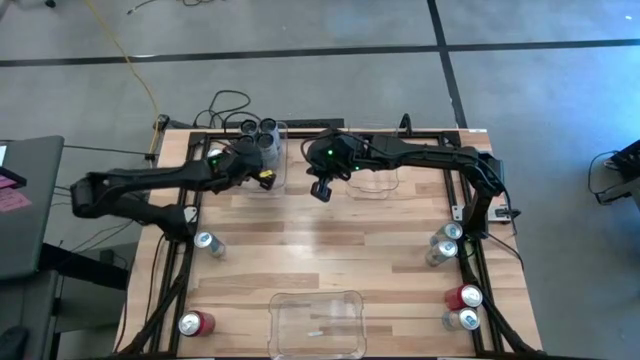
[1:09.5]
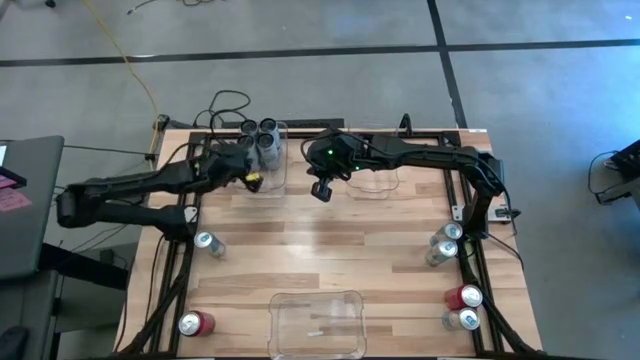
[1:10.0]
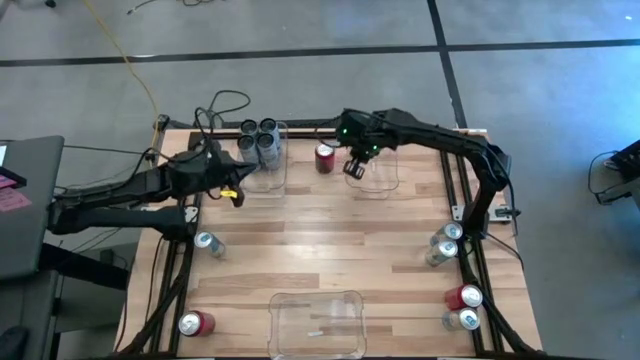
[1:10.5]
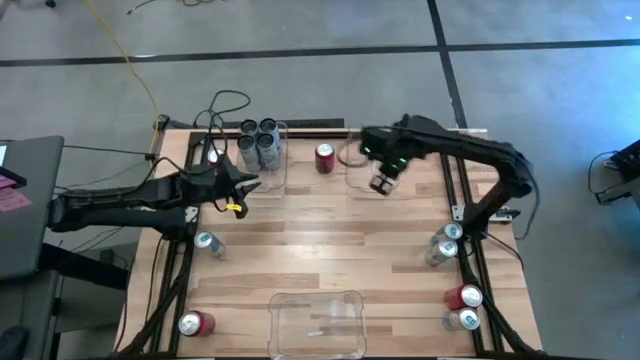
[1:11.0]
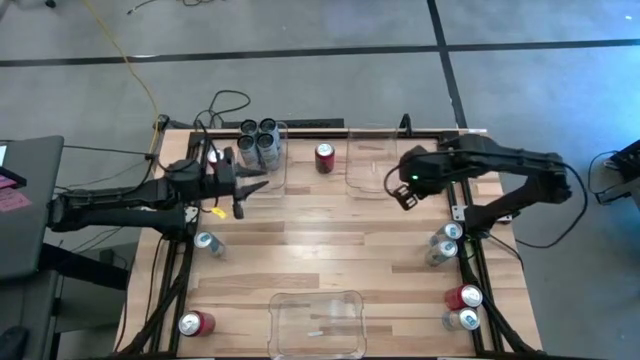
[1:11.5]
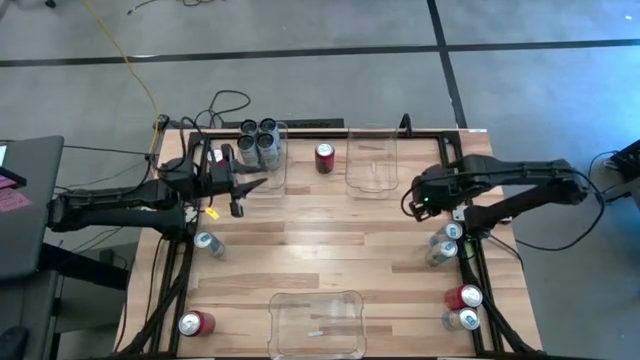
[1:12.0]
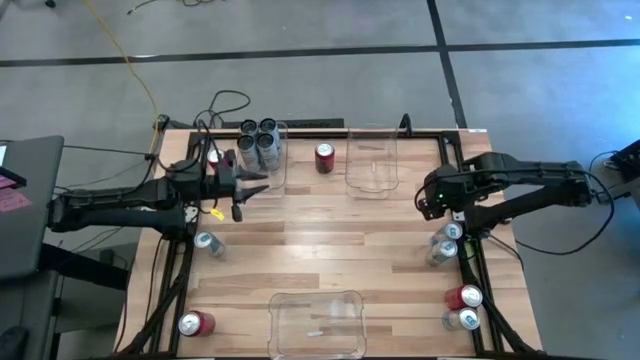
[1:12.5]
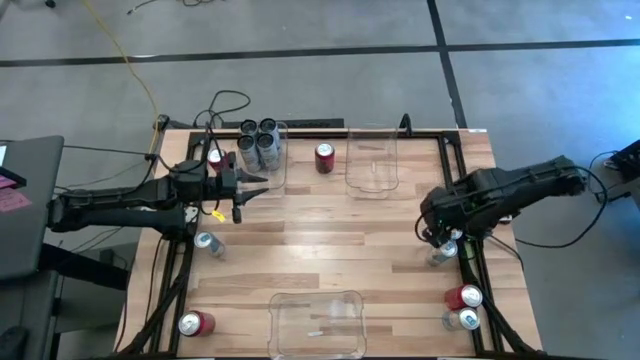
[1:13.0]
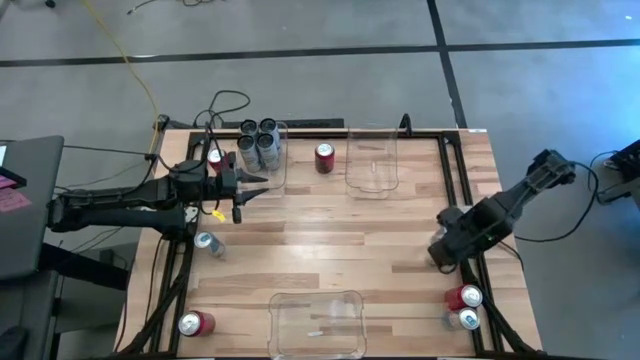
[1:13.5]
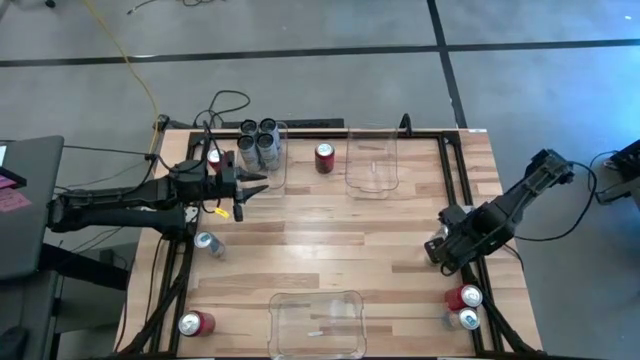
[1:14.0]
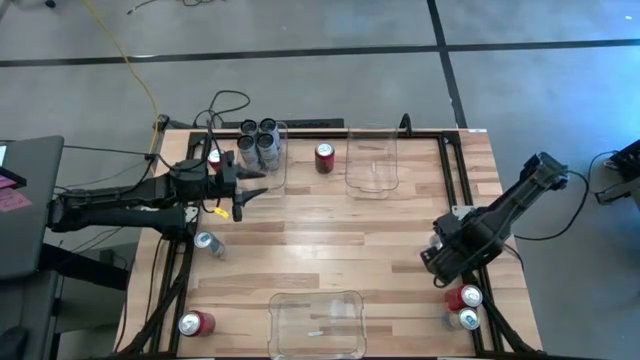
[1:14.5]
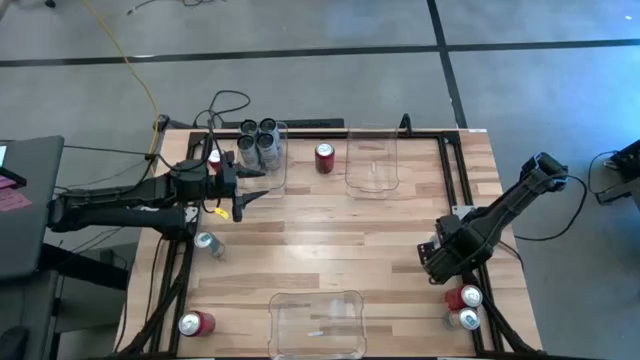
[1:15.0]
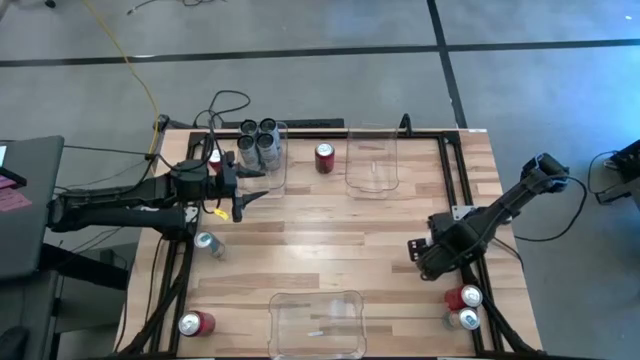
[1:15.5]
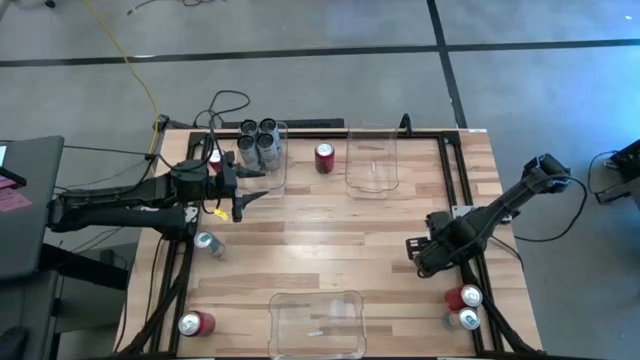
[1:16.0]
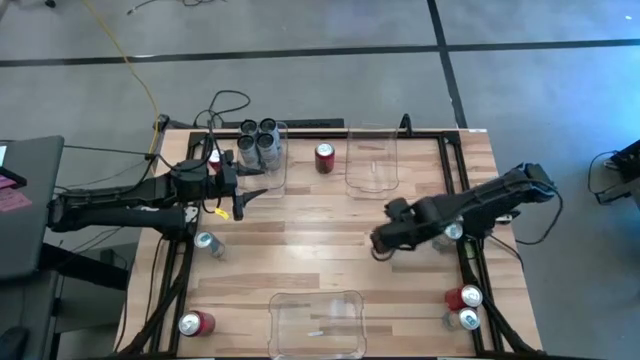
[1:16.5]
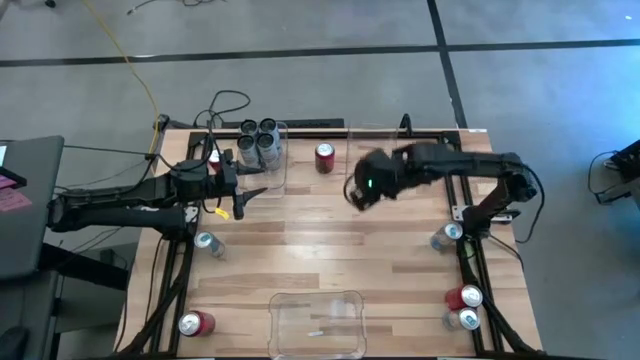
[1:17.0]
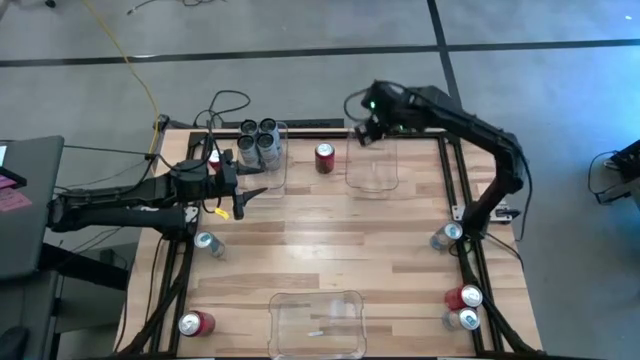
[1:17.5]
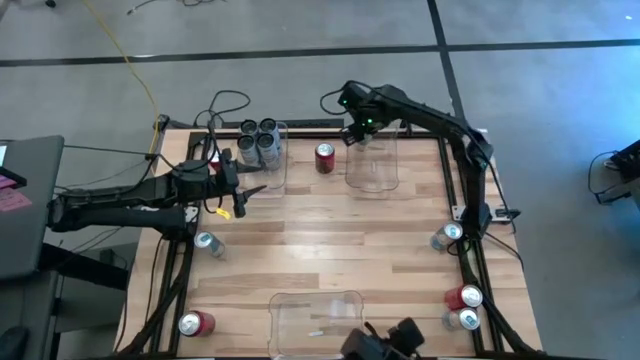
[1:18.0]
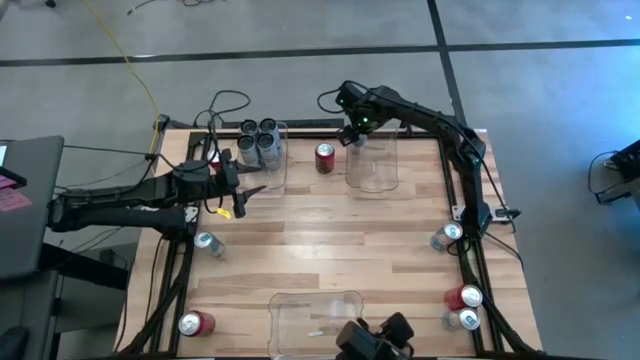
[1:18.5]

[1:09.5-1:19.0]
Task: Sort soda cans
Put the right center blue soda can into the top right transparent bin

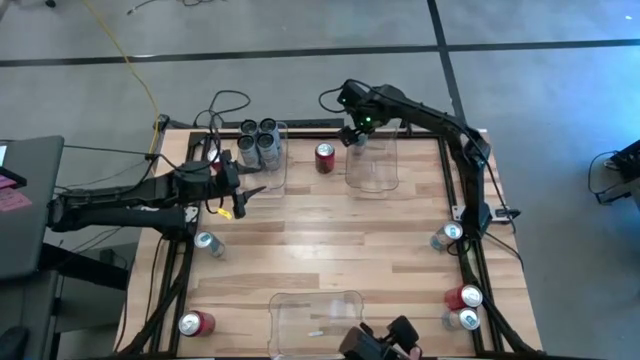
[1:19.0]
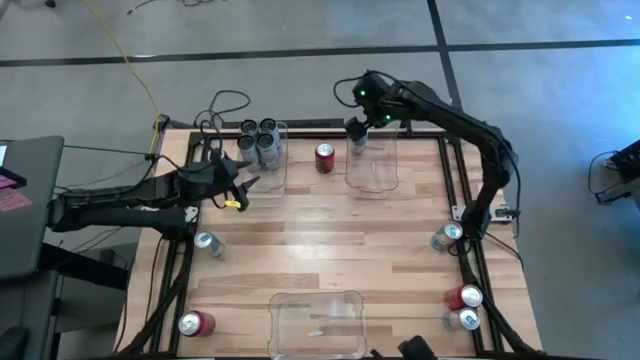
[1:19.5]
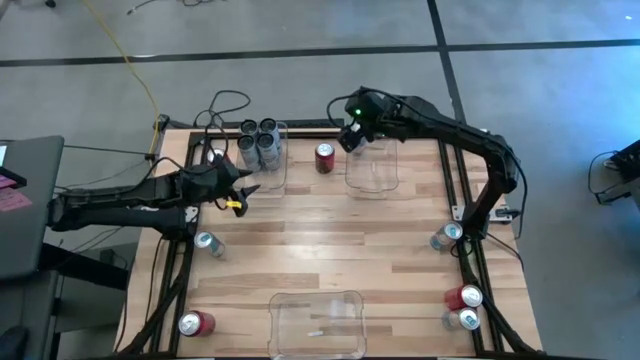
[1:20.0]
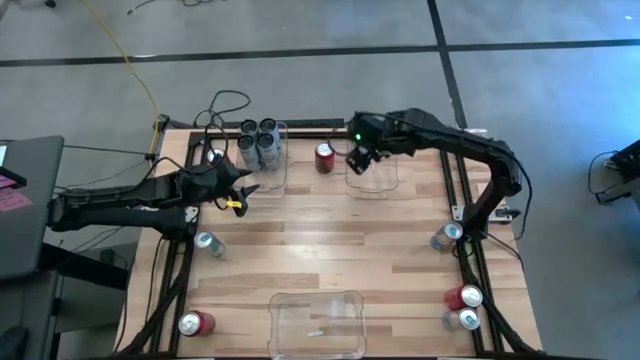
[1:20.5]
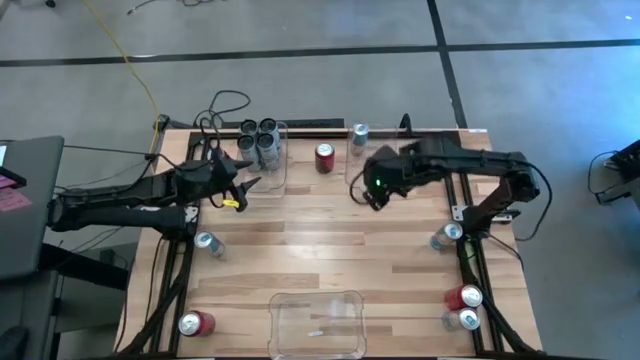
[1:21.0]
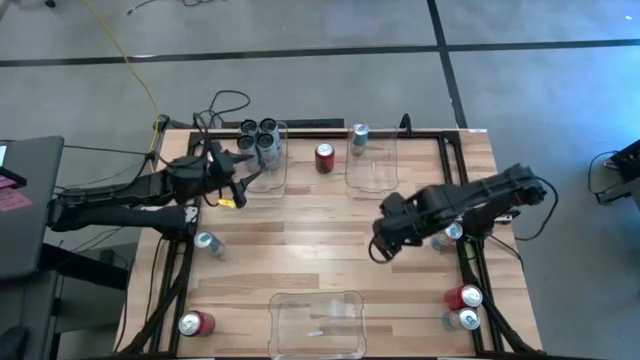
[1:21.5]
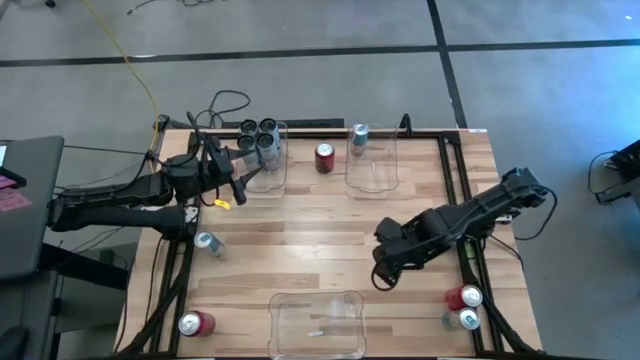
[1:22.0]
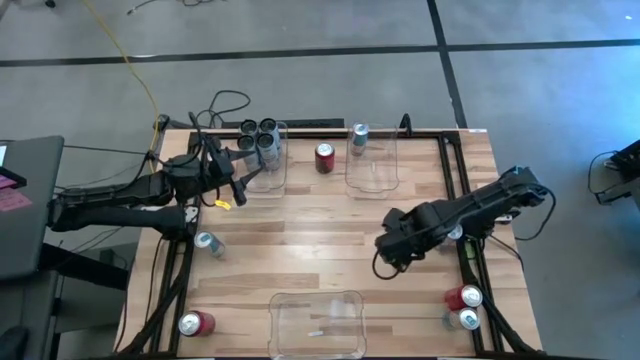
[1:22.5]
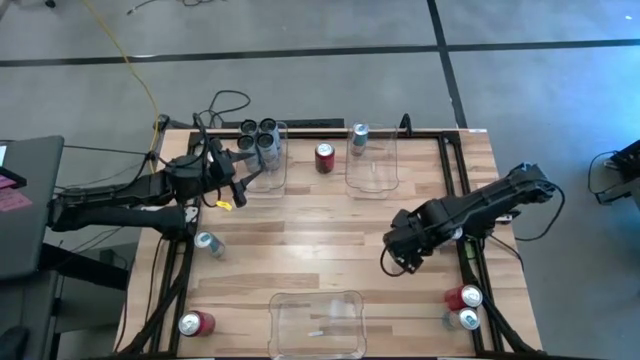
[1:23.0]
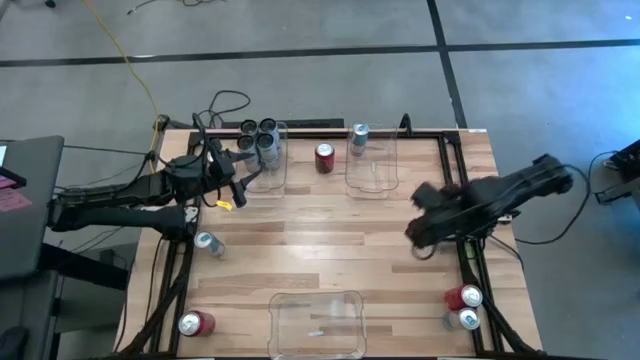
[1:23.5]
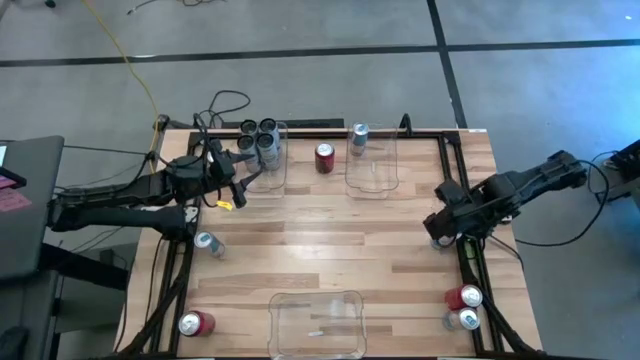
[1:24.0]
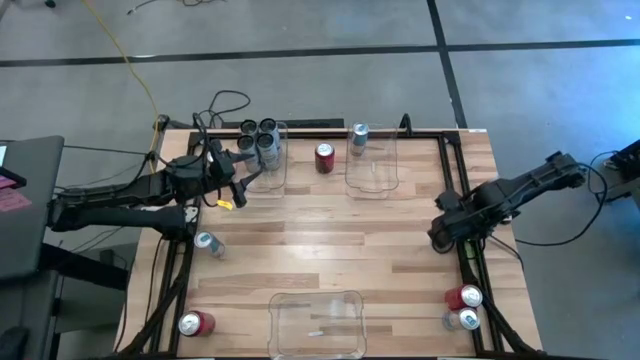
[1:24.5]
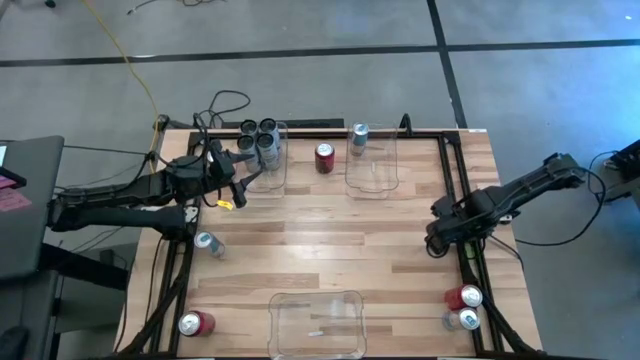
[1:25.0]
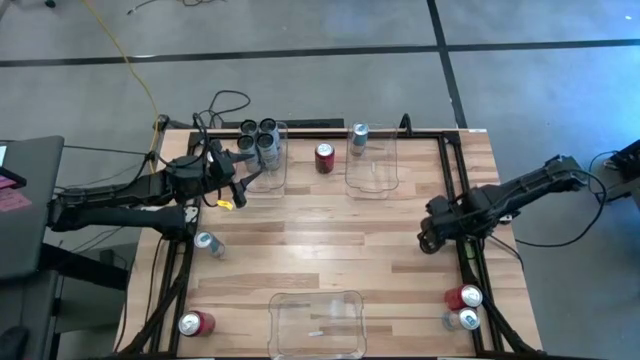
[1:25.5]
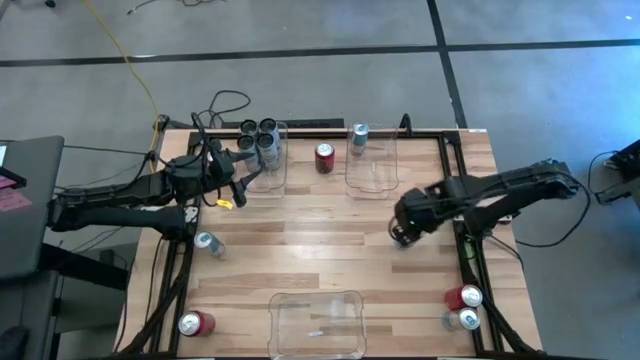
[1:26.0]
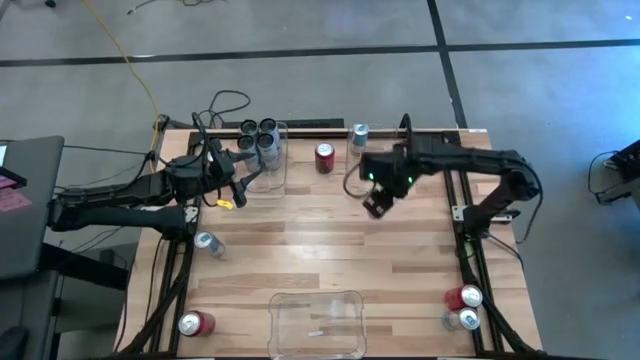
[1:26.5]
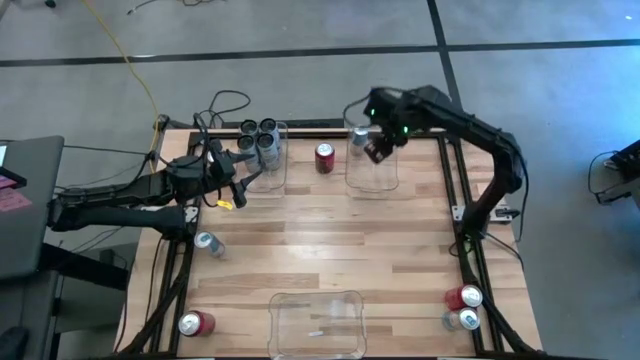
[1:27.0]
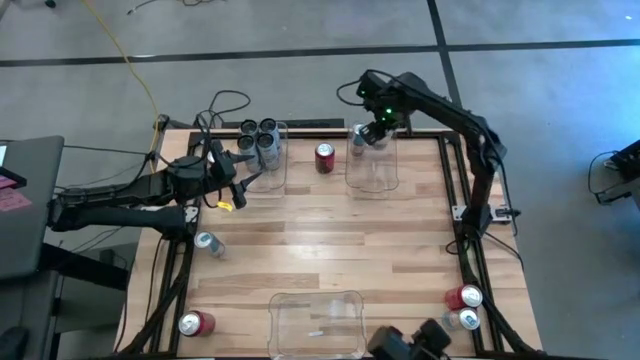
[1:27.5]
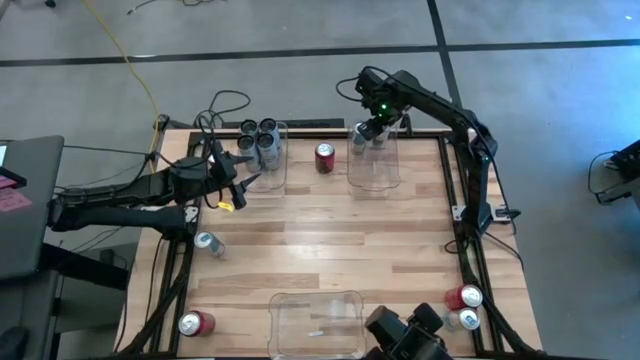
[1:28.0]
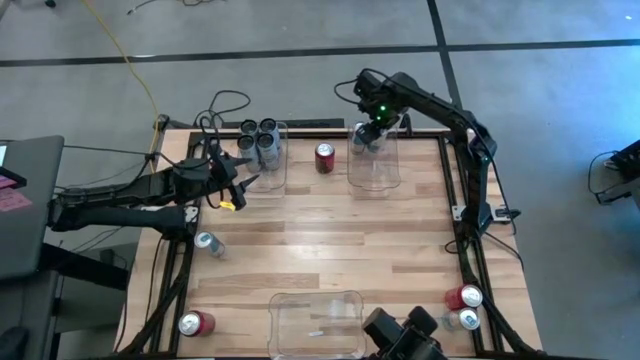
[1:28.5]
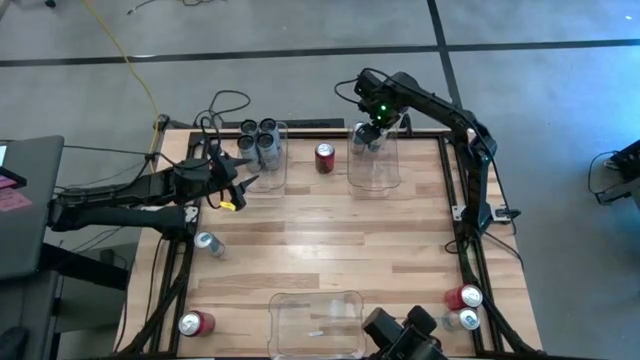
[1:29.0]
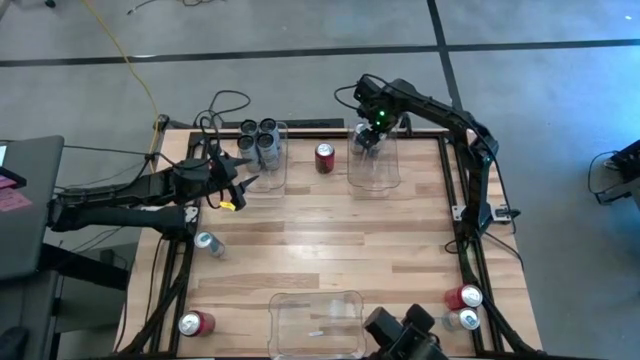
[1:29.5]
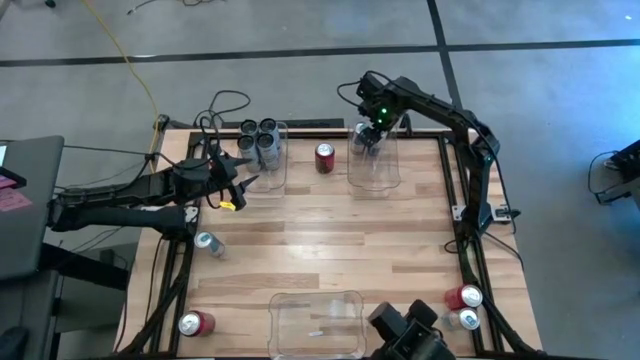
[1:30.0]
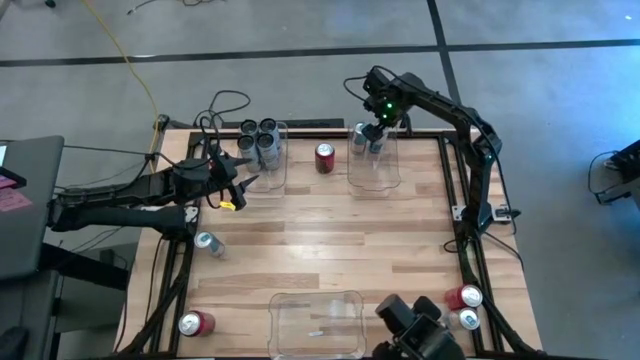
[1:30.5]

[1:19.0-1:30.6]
Put the top right blue soda can into the top right transparent bin
